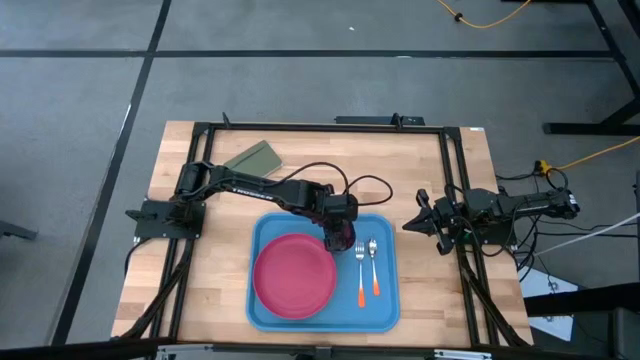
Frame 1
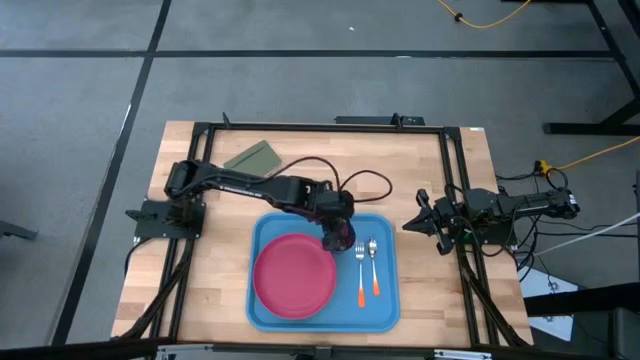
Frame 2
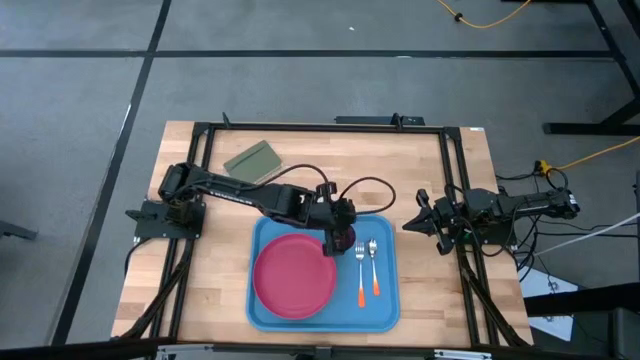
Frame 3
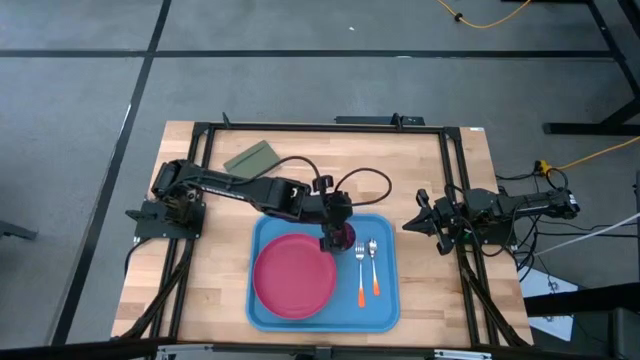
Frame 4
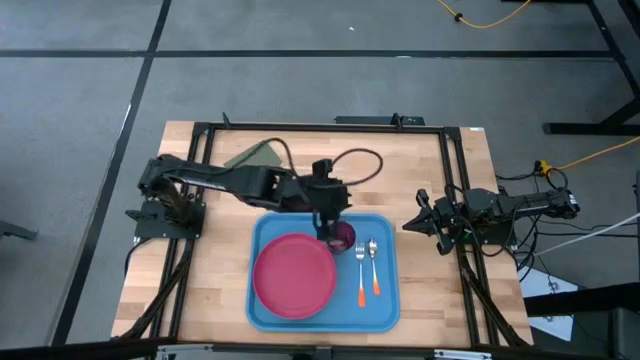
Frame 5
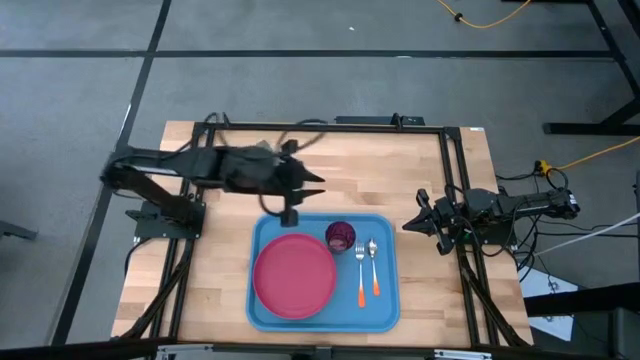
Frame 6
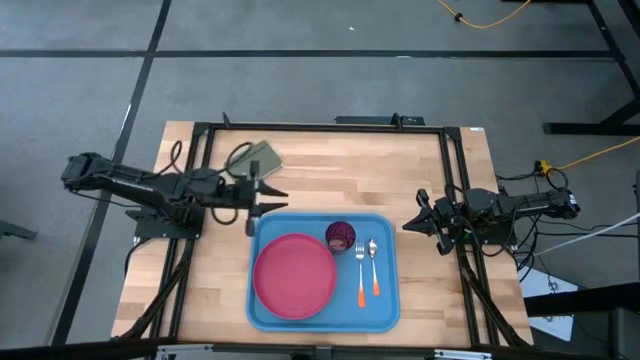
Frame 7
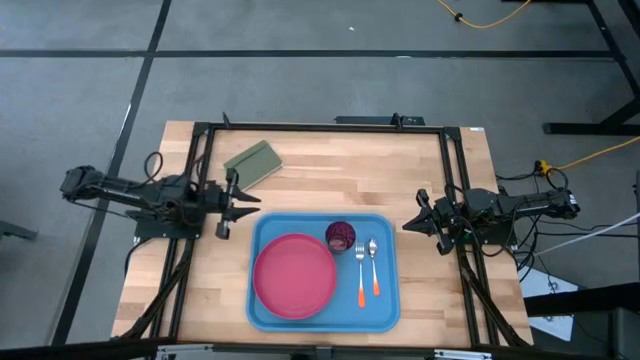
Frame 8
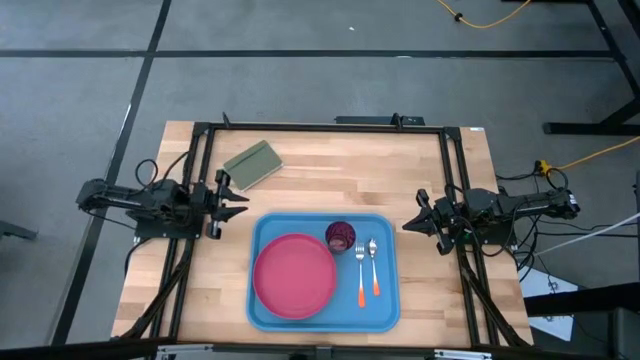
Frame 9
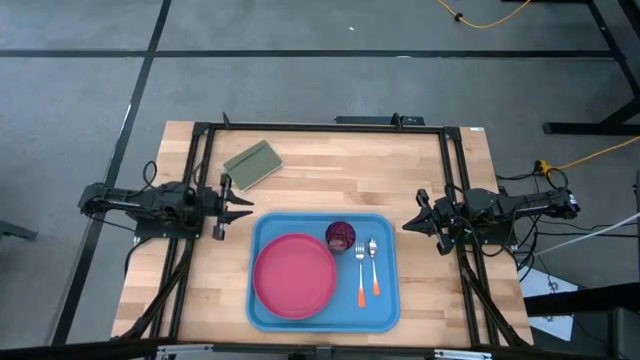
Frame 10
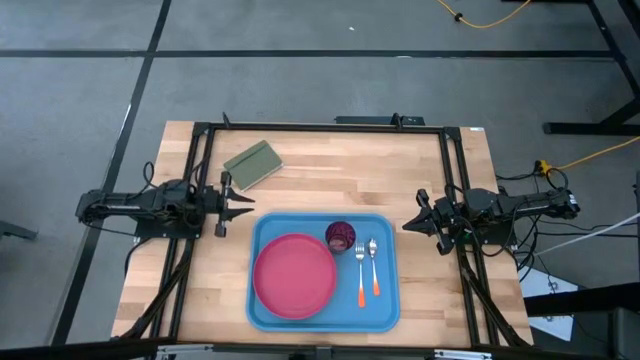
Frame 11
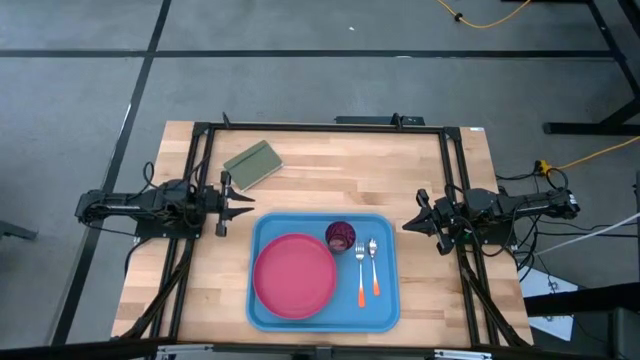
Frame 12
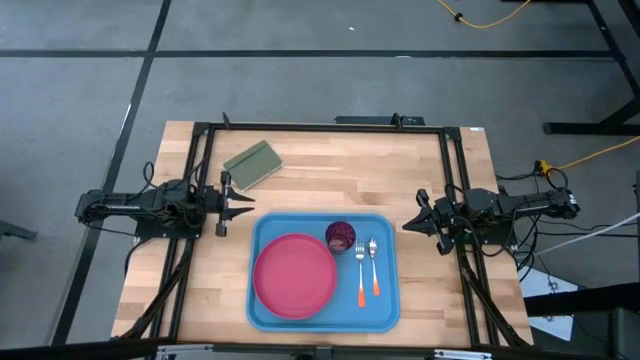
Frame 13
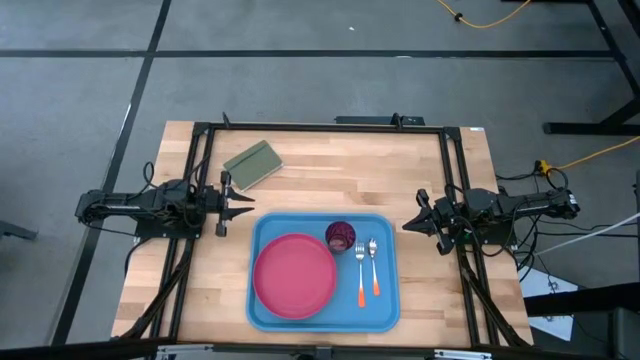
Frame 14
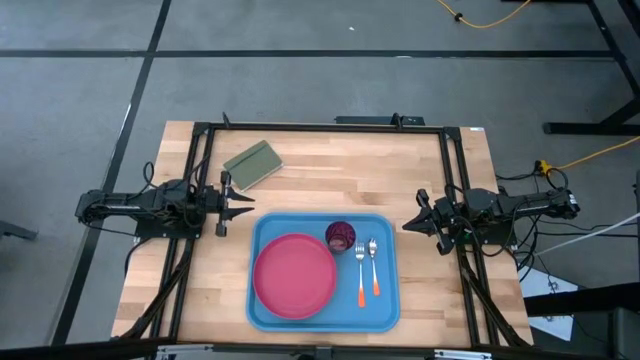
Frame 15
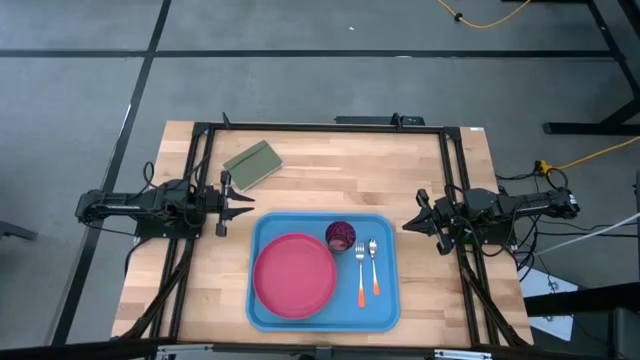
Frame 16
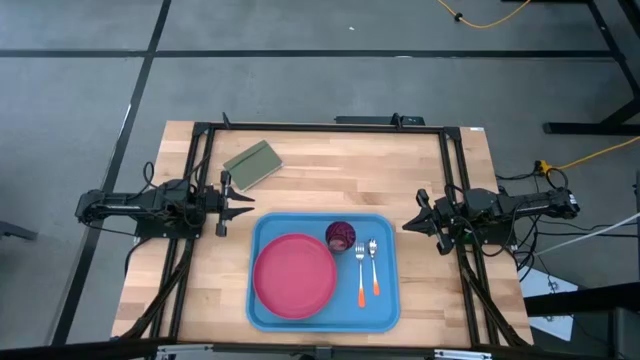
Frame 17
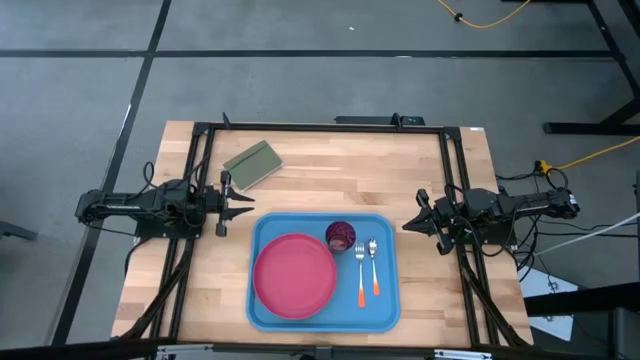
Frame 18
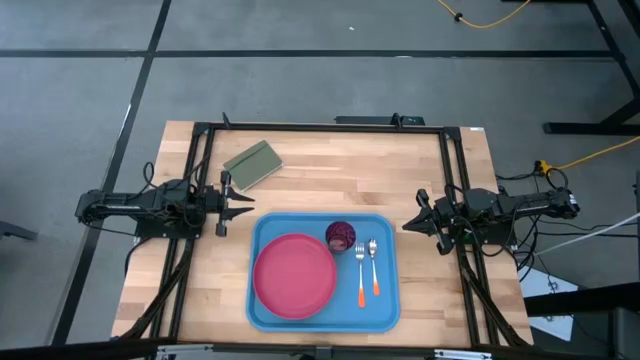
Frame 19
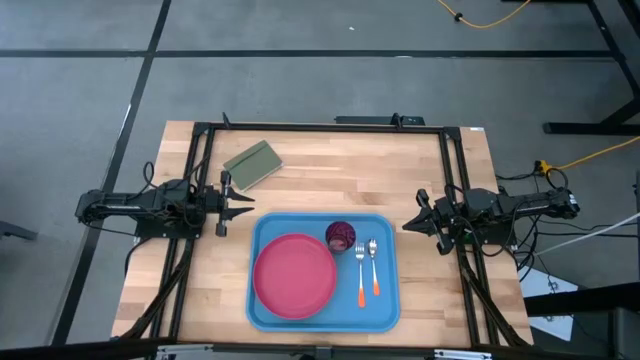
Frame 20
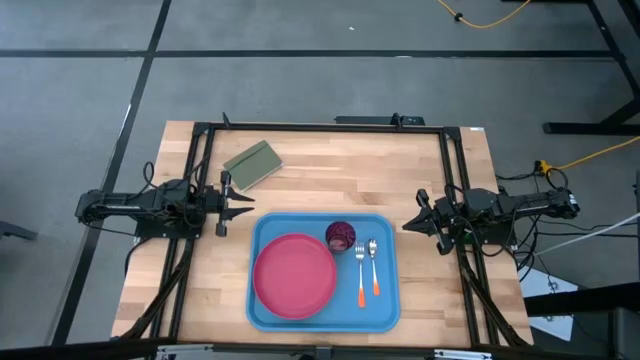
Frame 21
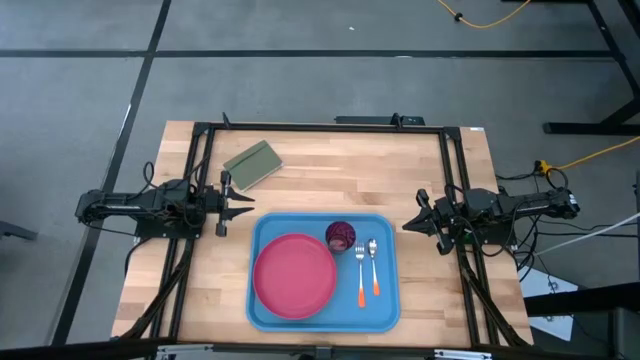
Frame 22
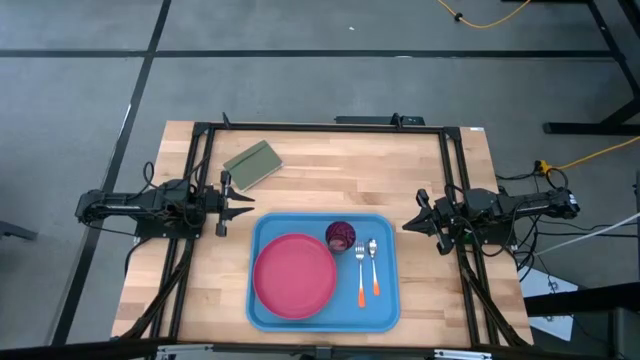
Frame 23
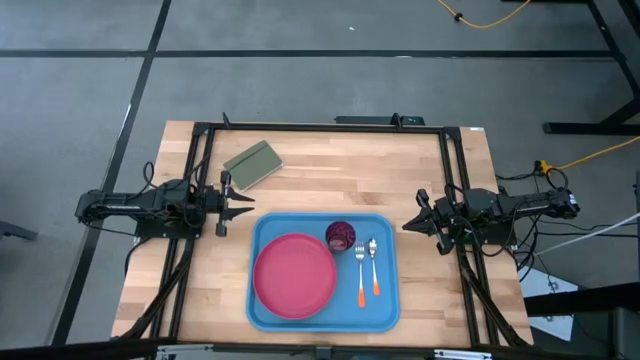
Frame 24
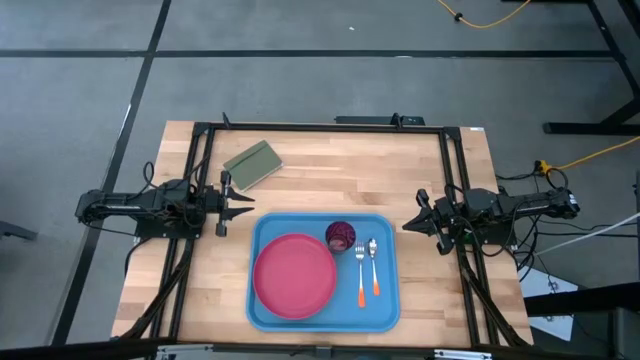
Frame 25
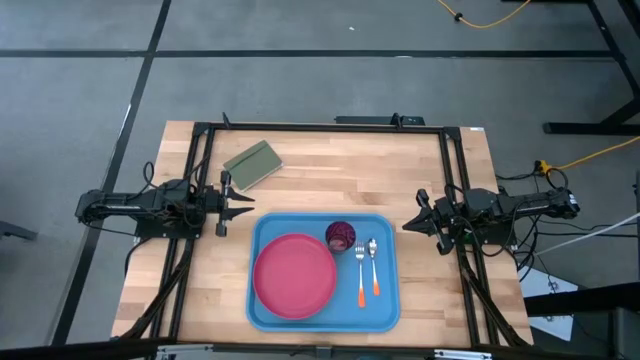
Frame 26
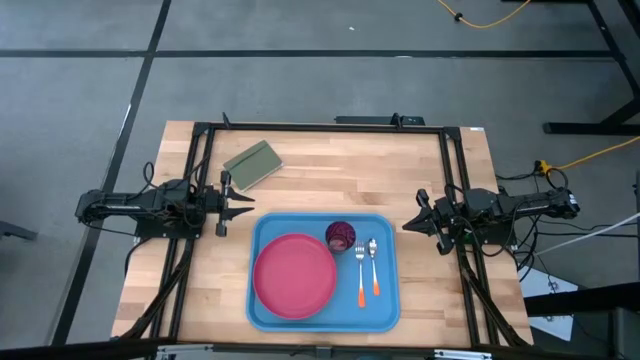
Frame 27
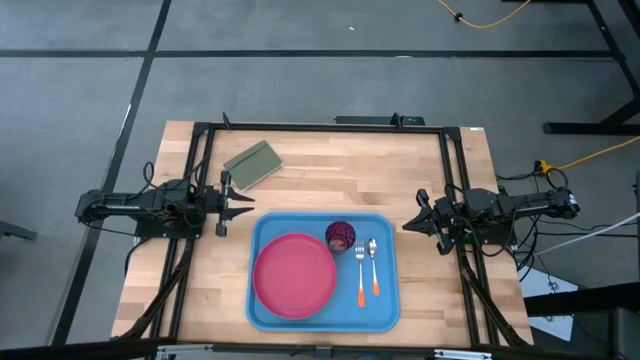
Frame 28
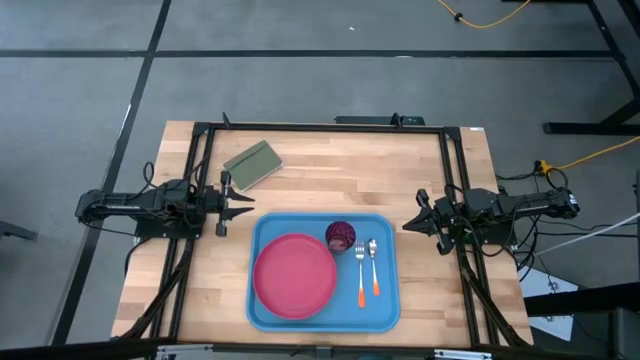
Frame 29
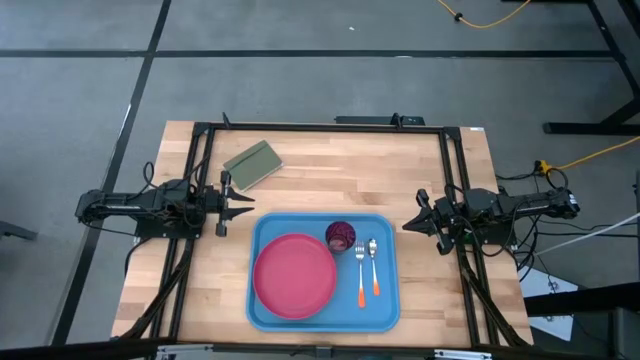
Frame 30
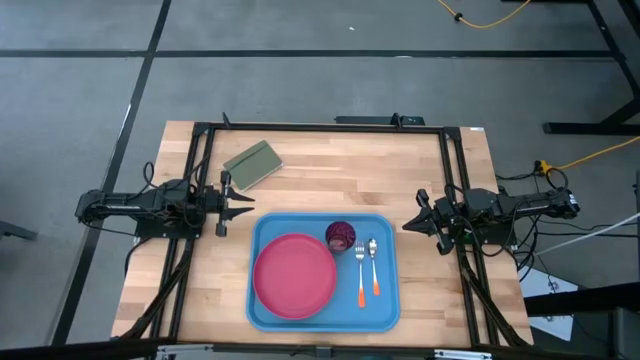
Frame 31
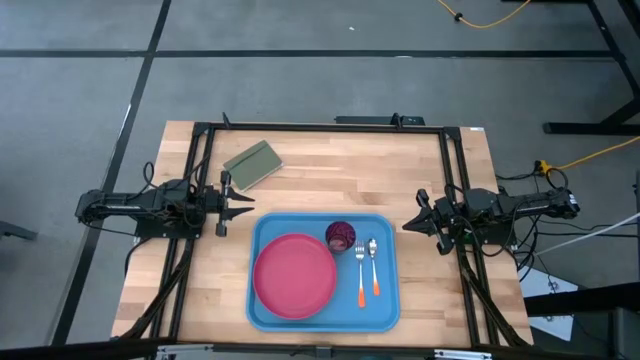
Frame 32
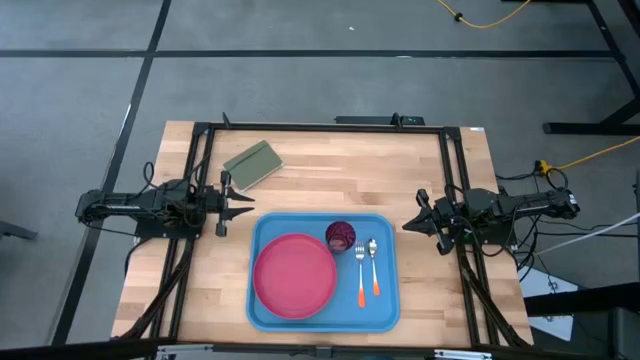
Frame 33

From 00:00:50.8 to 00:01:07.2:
Task: Pick and place plate/cup/fork/spoon on tray
Return to Home Position

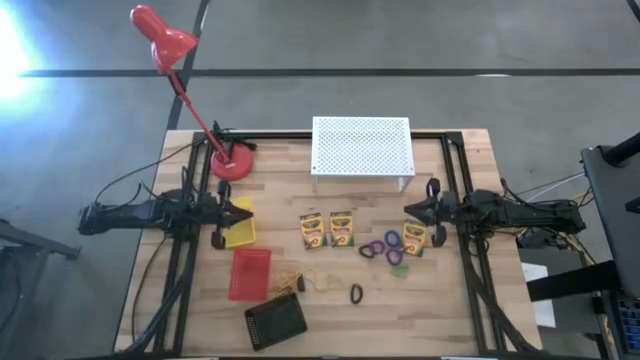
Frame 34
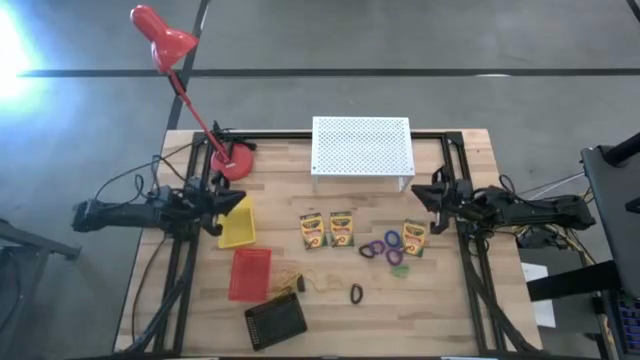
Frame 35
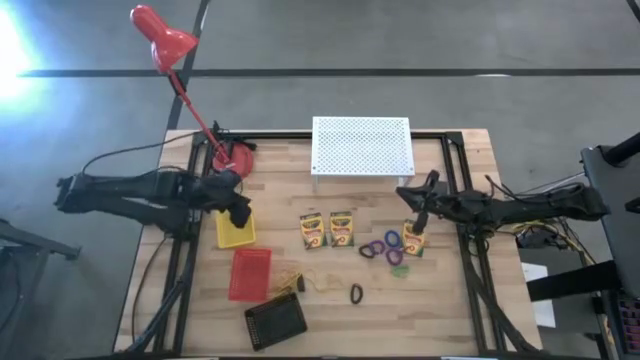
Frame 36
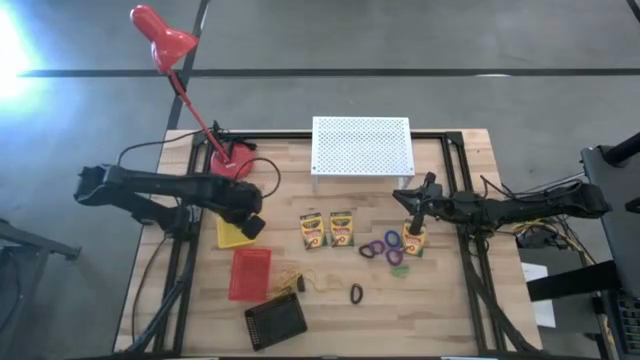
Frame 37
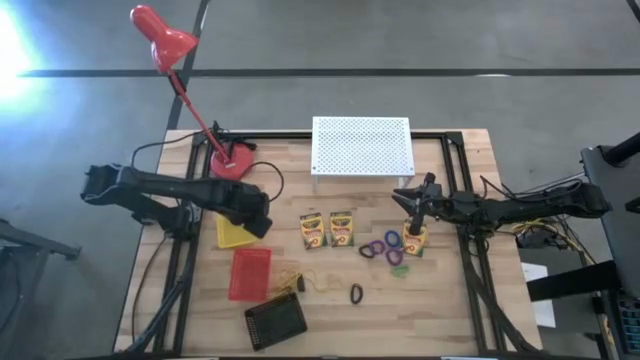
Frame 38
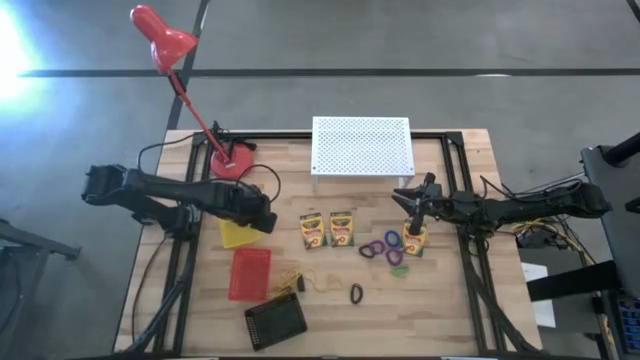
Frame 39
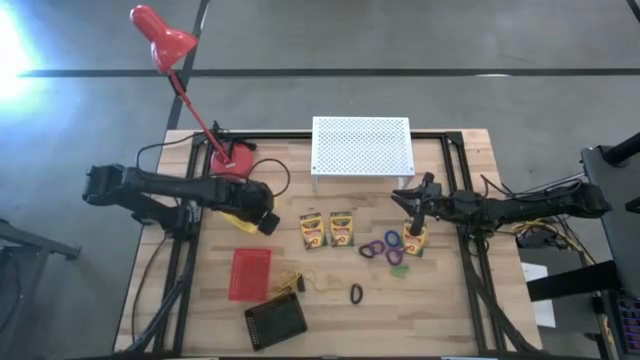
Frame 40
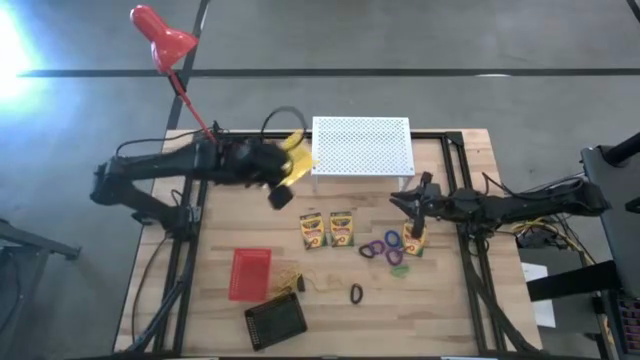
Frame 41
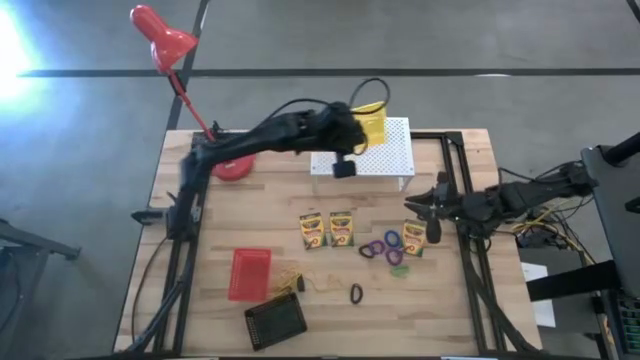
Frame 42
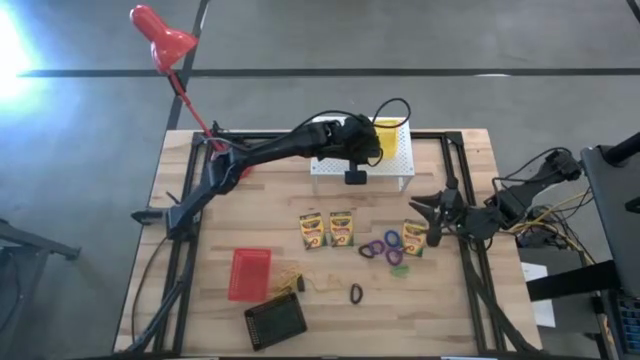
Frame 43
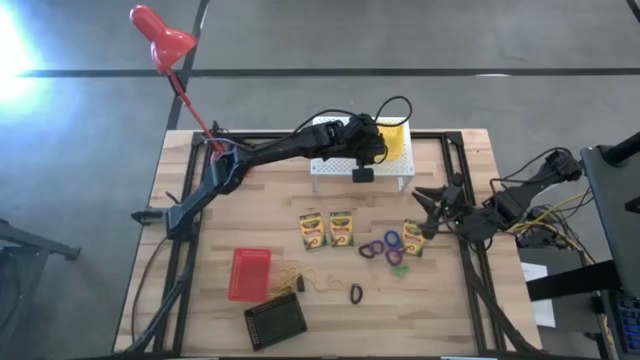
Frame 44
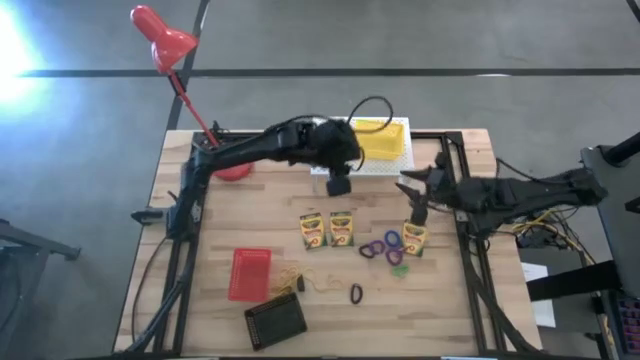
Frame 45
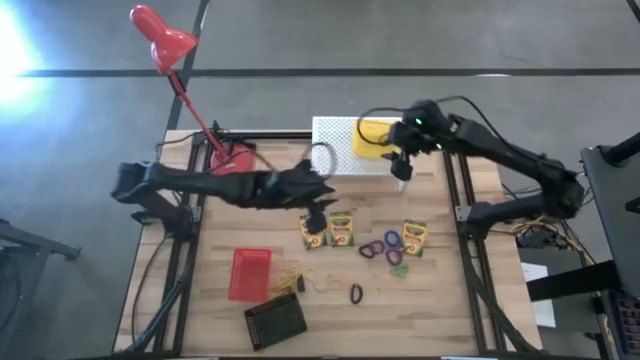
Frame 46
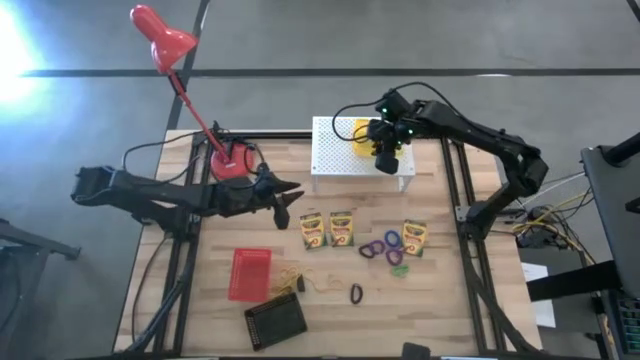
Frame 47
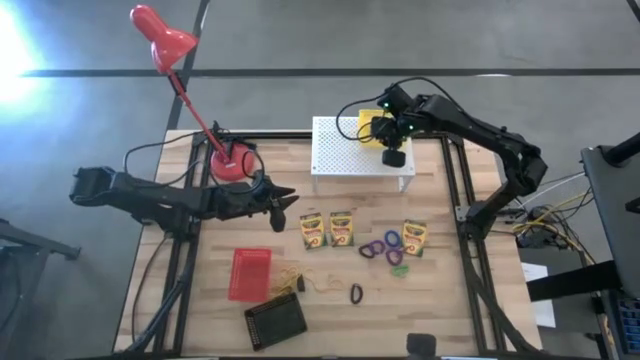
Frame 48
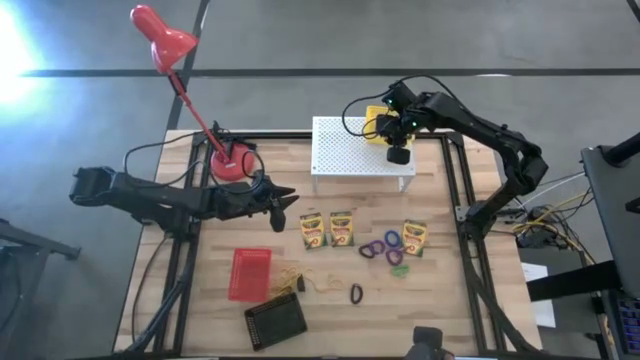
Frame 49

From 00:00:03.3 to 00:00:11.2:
Task: Pick & Place Office Desk Supplies
Put the yellow basket on the shelf
